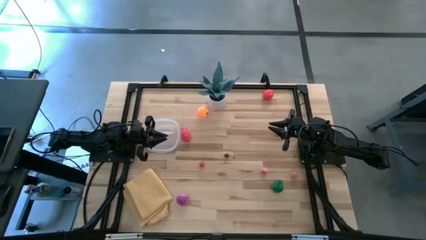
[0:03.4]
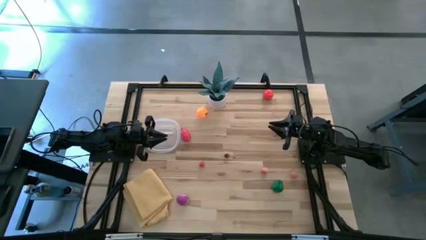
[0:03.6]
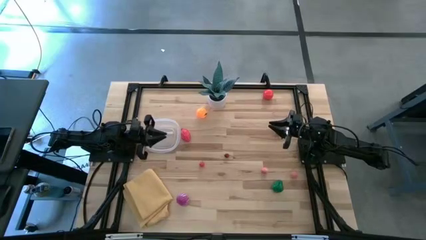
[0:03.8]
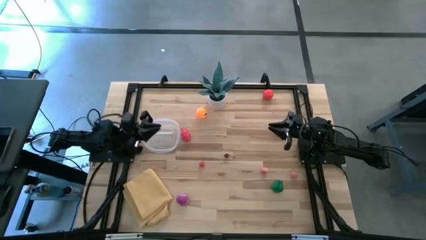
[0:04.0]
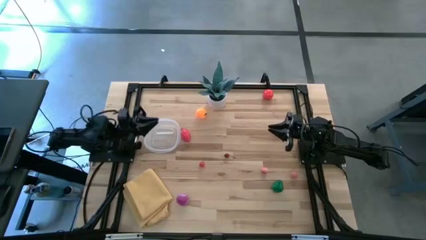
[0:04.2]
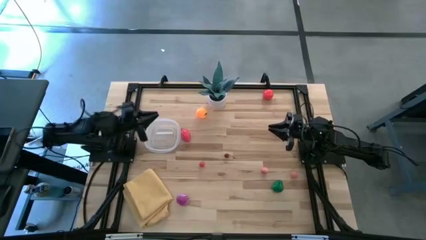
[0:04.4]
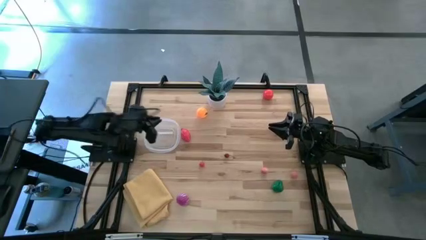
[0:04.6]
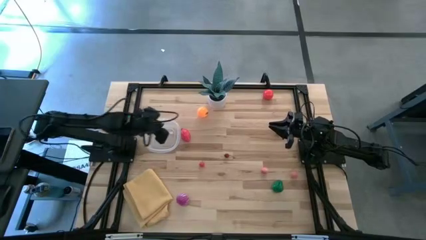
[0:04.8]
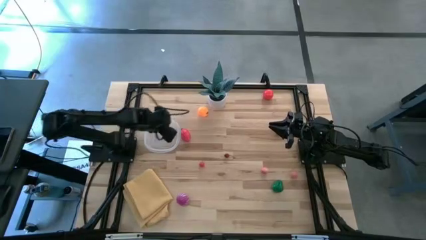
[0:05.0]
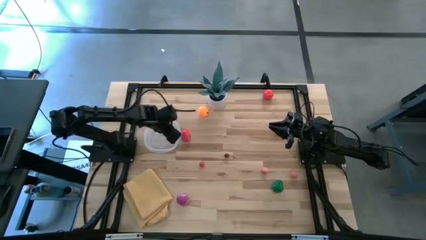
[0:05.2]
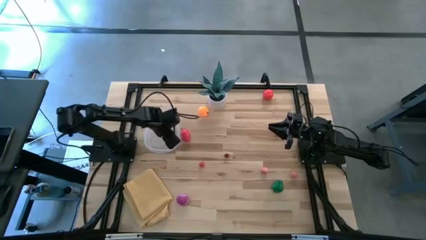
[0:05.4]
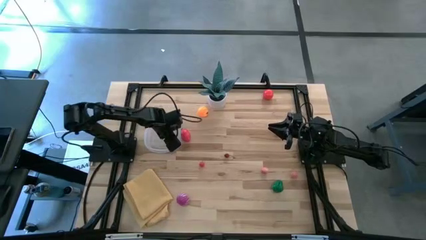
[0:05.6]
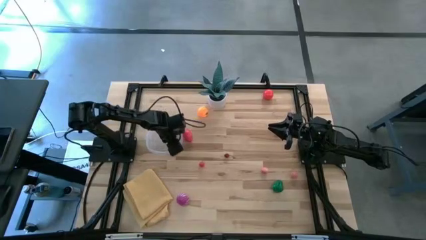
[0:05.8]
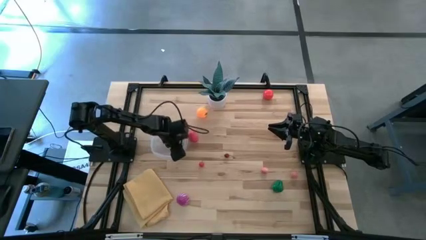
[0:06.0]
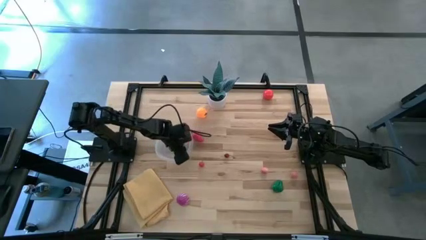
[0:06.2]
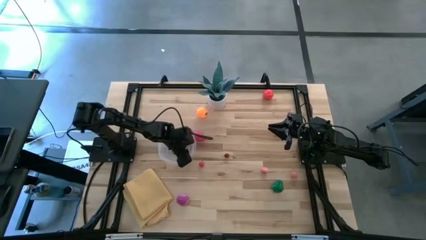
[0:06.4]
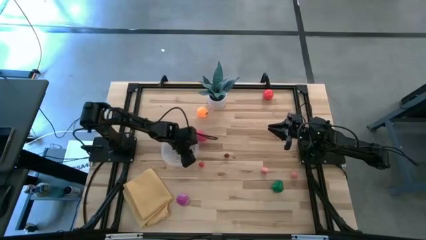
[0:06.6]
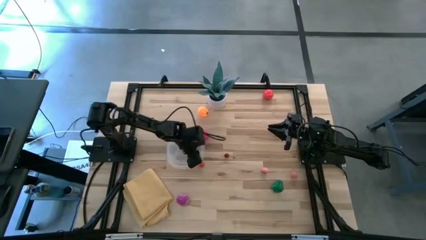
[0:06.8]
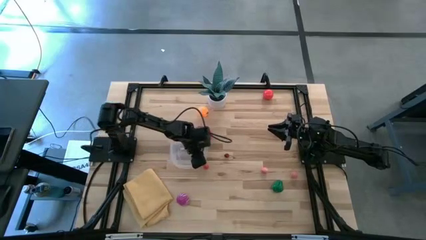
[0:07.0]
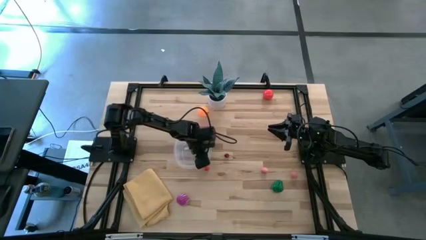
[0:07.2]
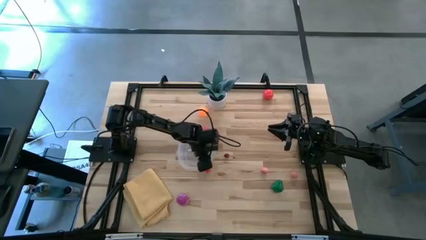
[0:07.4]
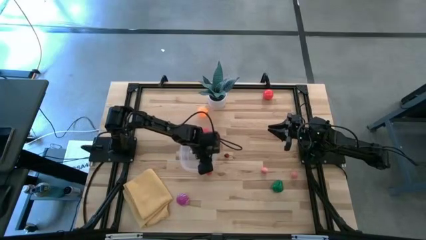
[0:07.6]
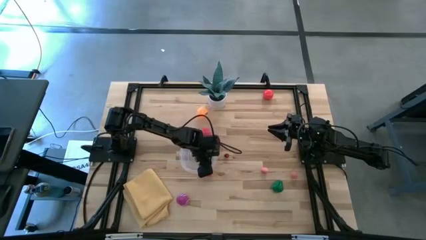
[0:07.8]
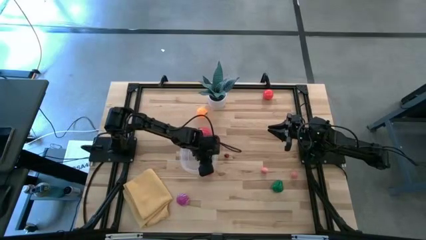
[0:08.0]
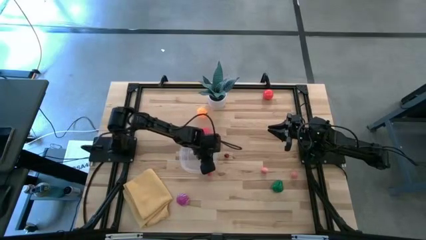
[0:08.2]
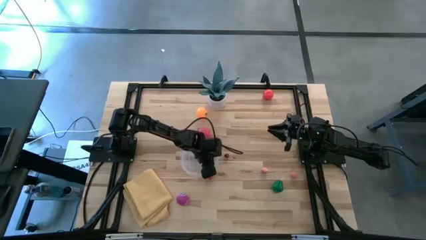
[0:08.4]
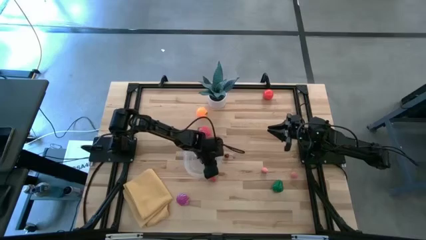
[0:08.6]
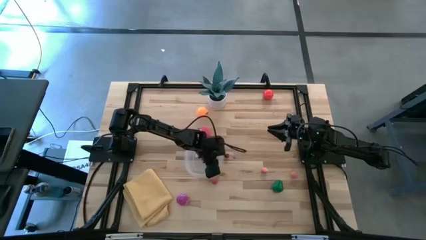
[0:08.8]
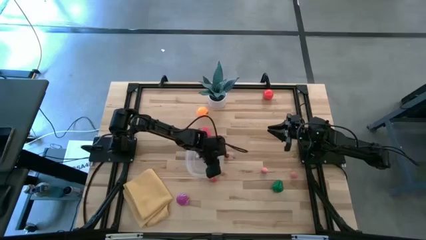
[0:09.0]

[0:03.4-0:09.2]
Task: Pick and placing Produce into tupperware
Move the transparent bin to the center of the table

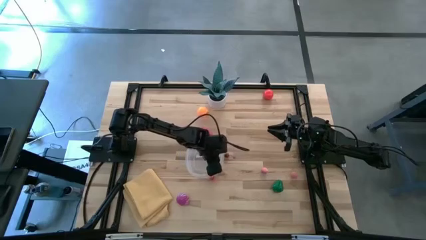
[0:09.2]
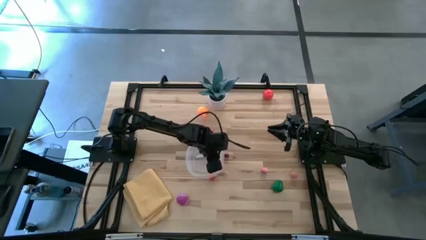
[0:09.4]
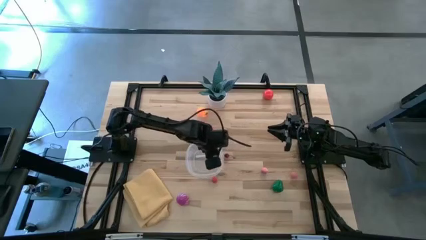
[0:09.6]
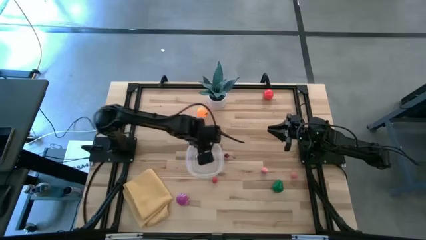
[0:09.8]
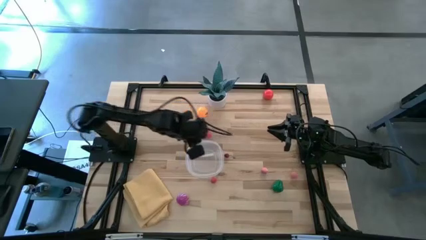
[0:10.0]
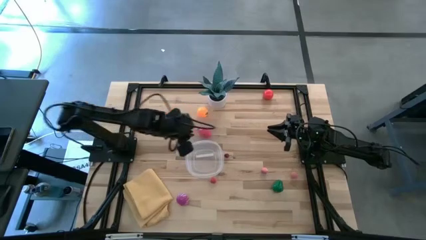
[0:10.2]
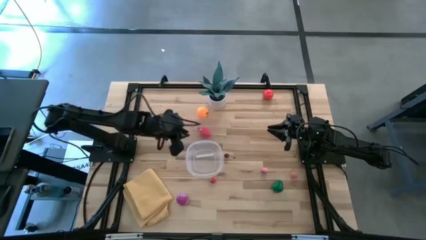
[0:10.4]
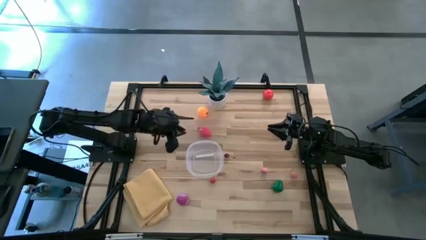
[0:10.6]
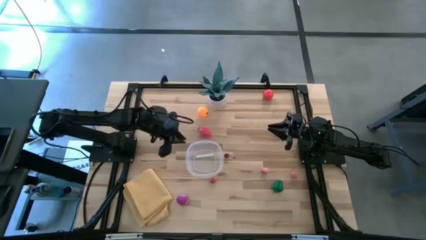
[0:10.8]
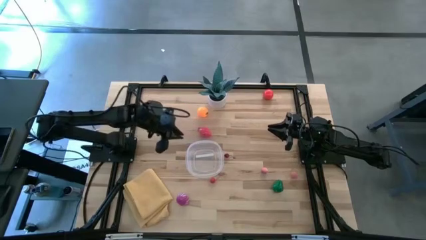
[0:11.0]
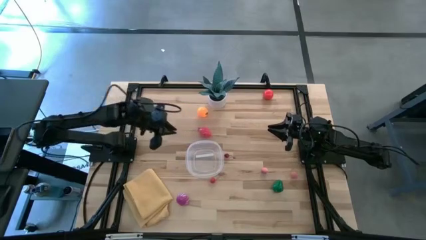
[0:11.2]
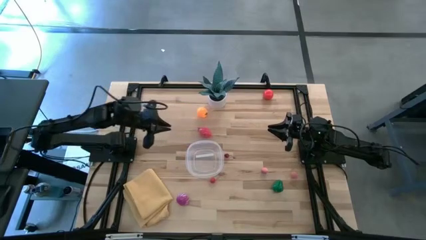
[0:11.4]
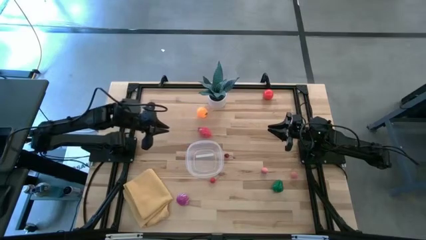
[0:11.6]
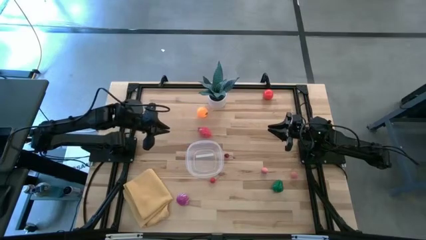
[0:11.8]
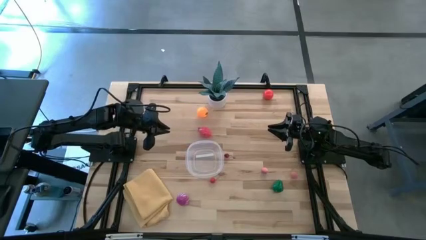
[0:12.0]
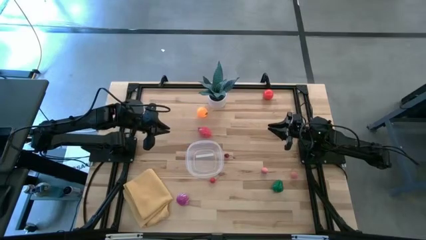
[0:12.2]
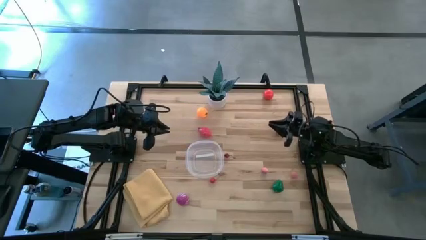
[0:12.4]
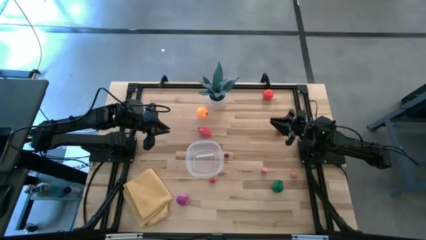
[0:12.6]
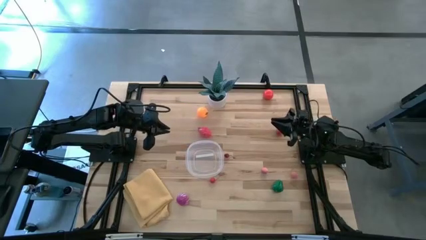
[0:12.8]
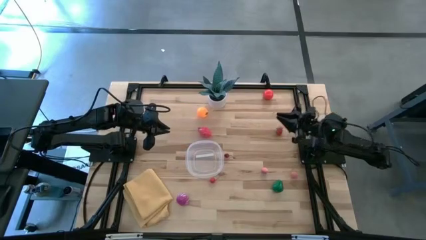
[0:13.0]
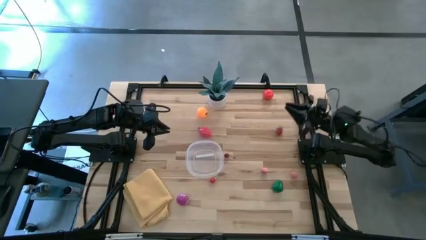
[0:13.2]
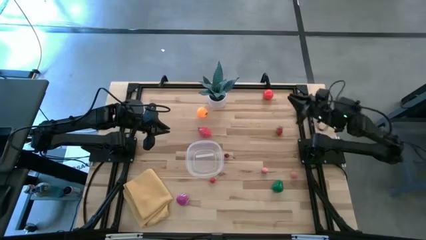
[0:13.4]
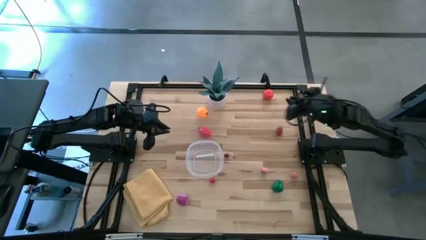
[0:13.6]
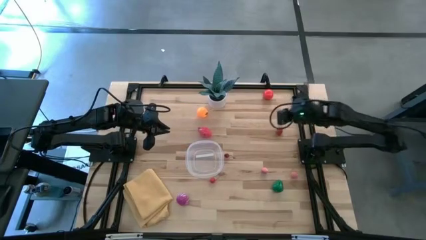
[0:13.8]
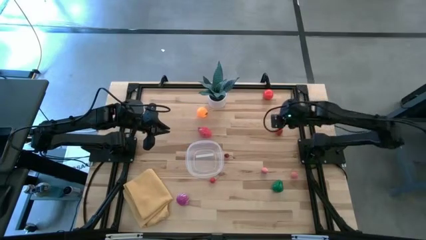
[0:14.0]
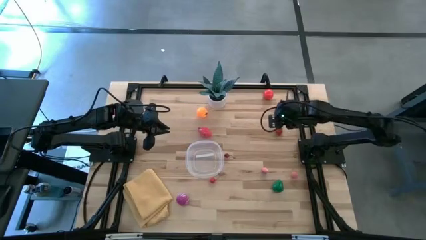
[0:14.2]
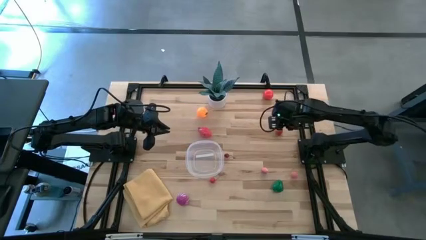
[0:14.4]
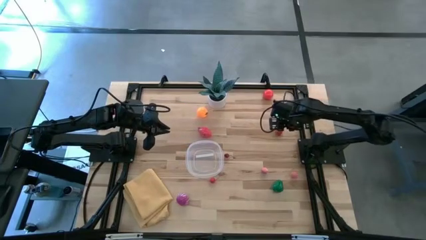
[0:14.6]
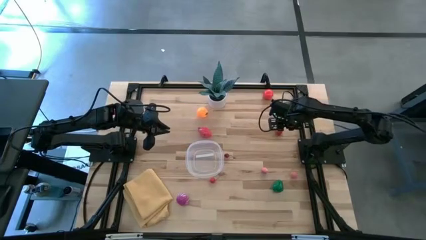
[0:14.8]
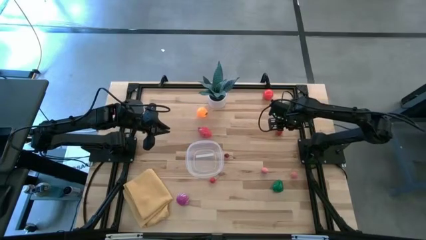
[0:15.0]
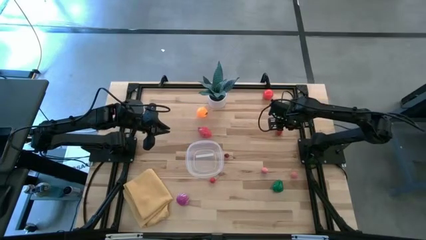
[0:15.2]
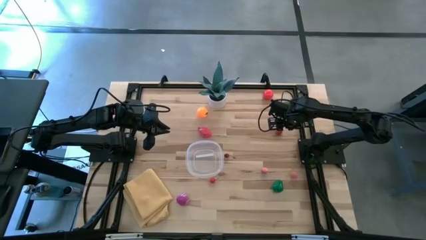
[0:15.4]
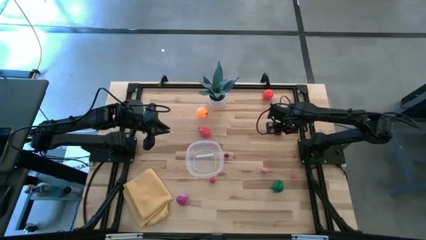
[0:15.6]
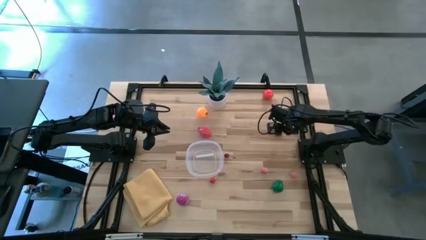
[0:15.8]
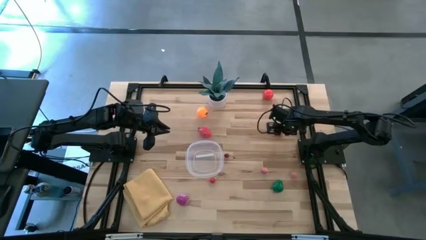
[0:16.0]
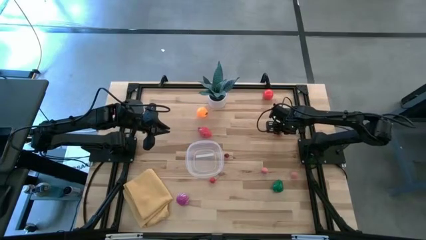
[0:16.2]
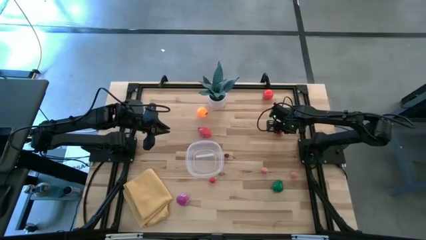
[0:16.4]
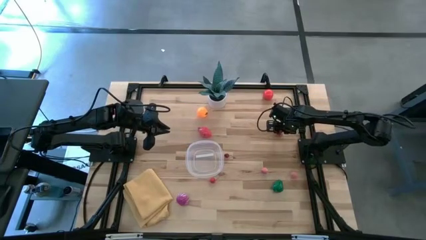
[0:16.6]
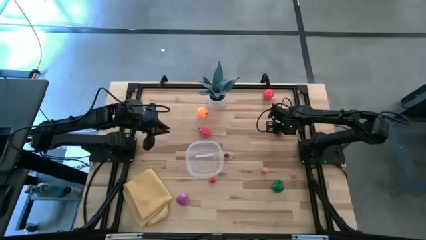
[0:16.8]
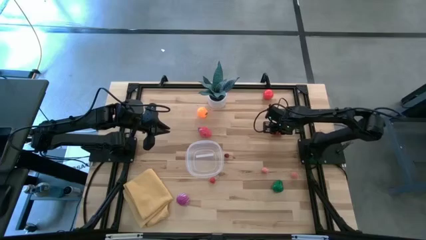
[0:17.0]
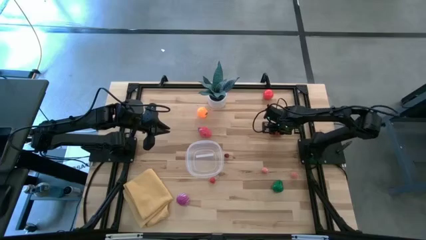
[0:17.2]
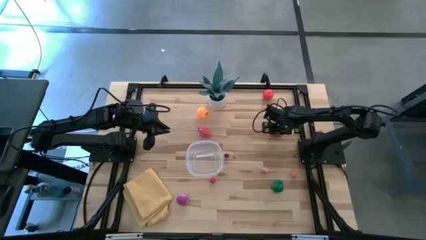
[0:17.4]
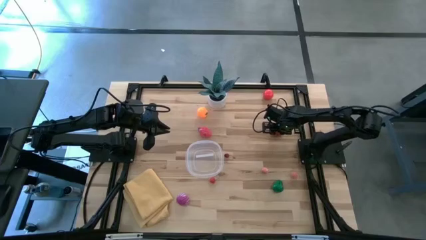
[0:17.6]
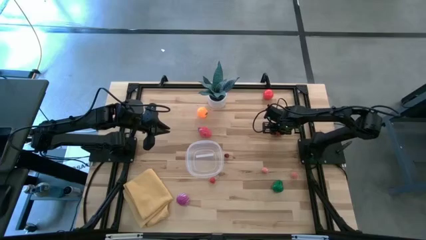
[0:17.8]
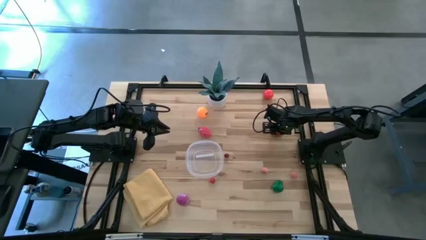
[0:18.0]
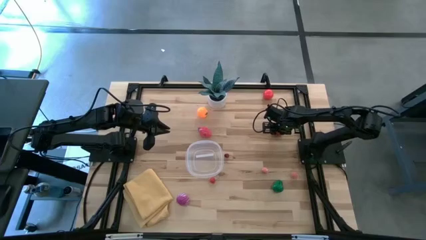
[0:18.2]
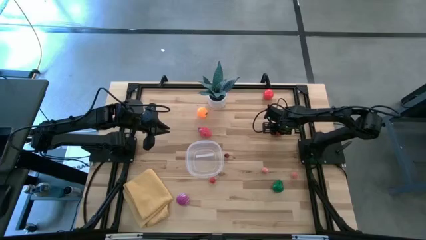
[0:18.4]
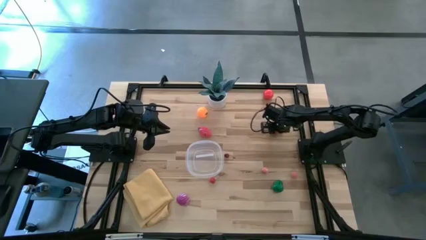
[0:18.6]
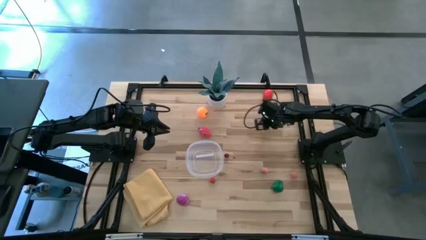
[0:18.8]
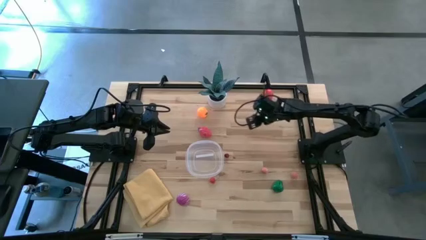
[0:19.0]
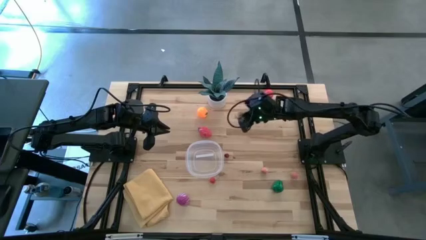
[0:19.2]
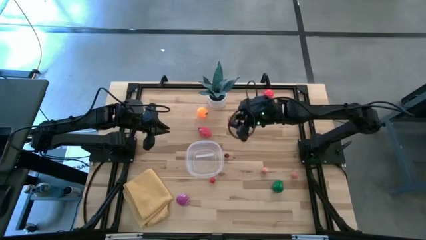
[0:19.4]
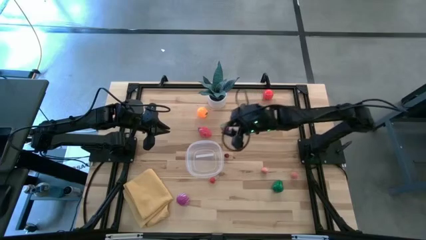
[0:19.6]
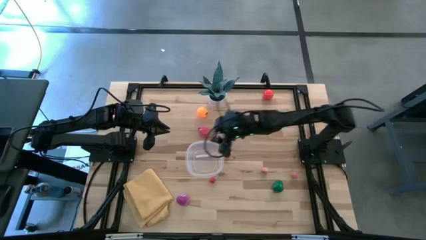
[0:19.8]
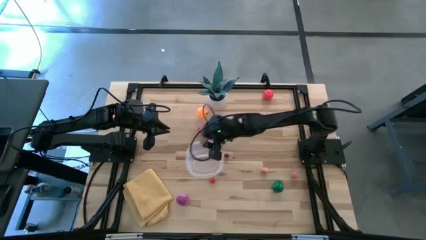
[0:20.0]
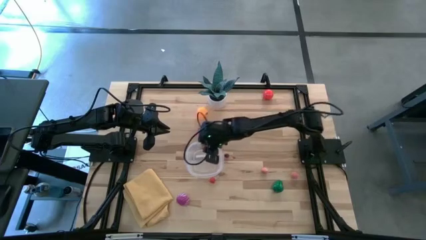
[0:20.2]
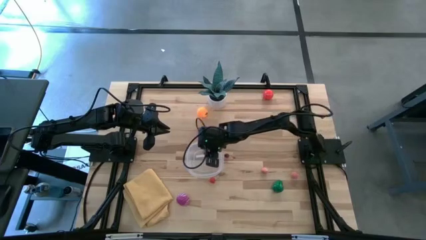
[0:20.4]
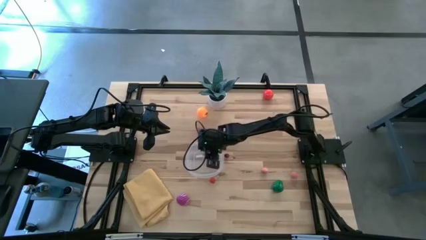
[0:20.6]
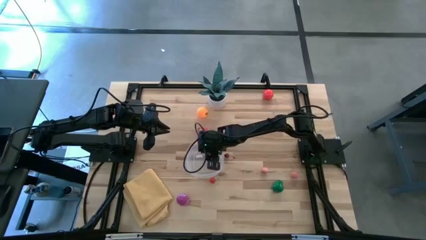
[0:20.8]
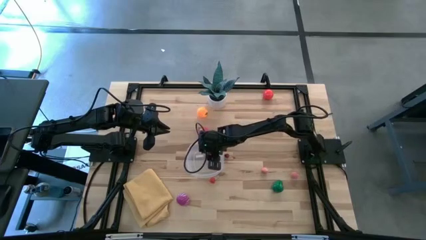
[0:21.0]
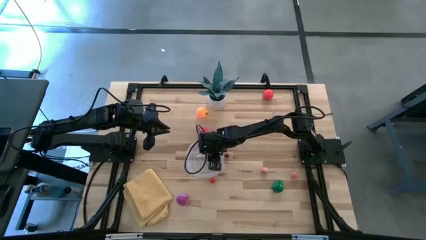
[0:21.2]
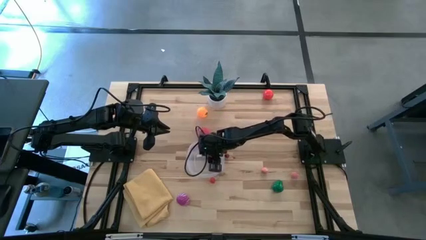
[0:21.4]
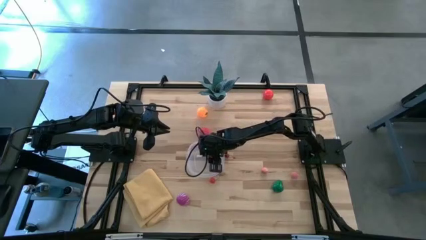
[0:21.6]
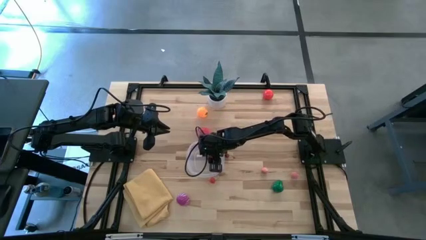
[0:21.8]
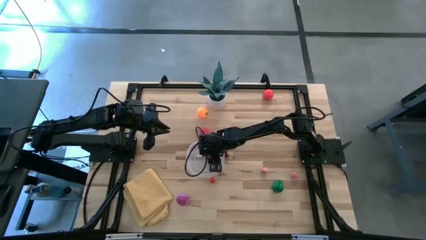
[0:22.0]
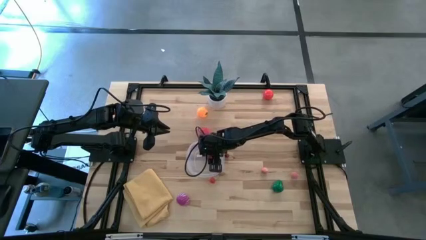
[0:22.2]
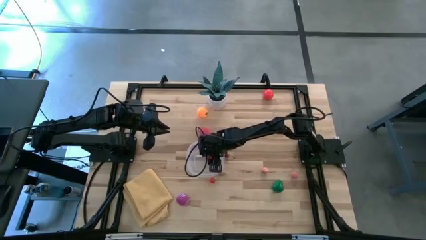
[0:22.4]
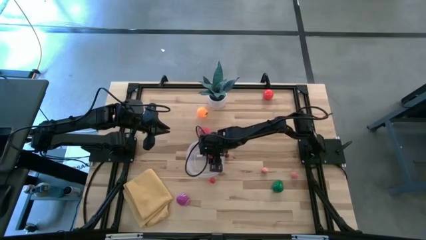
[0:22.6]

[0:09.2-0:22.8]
Put the red strawberry into the transparent bin
